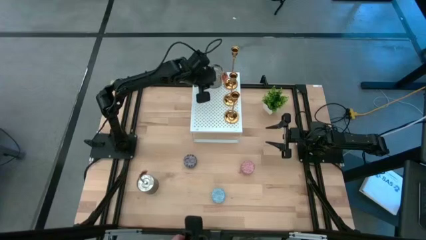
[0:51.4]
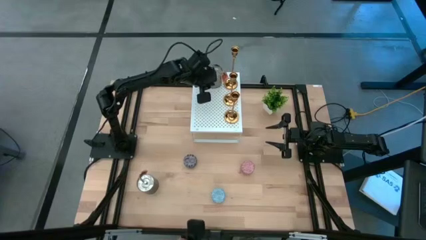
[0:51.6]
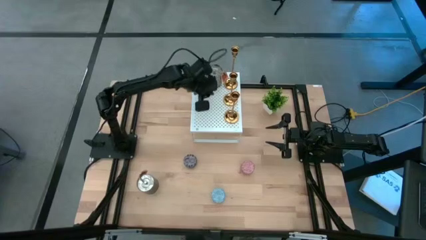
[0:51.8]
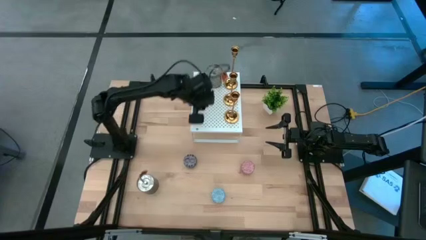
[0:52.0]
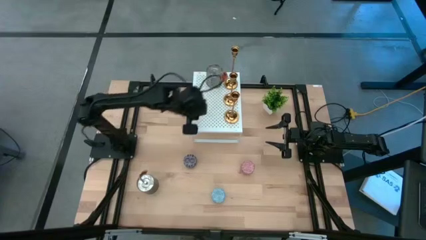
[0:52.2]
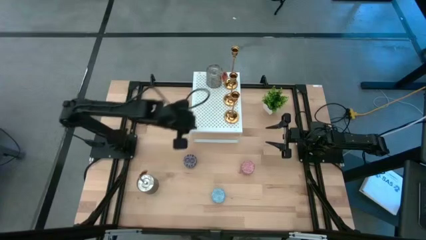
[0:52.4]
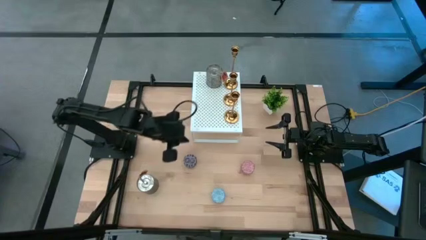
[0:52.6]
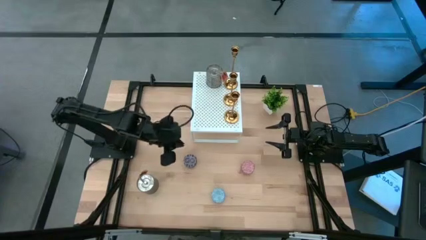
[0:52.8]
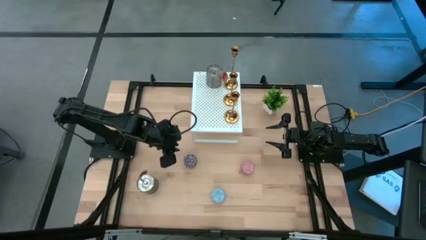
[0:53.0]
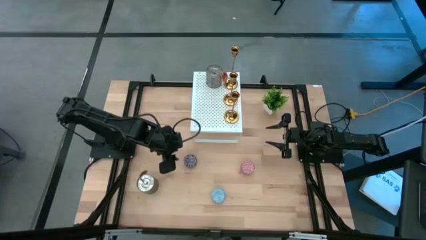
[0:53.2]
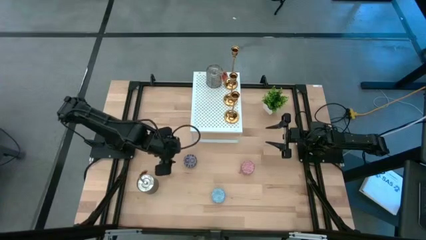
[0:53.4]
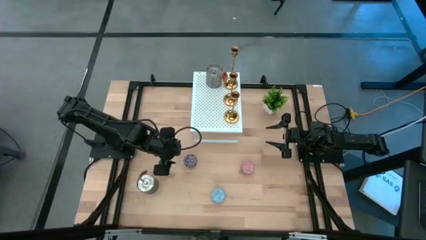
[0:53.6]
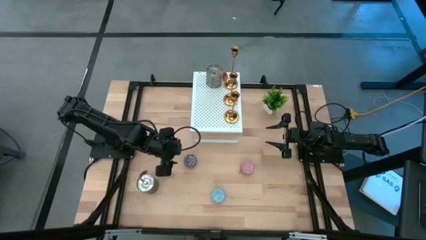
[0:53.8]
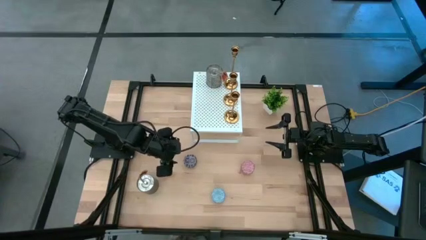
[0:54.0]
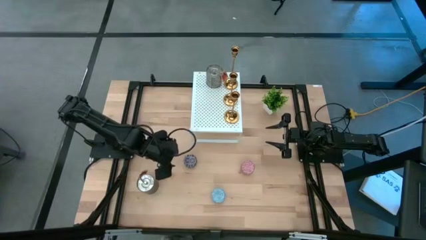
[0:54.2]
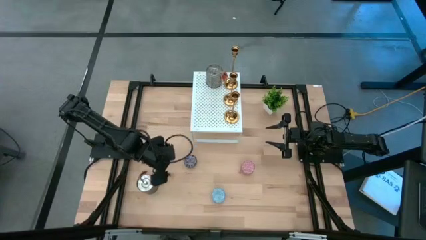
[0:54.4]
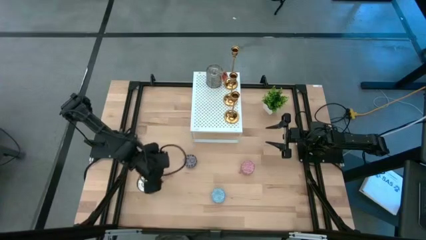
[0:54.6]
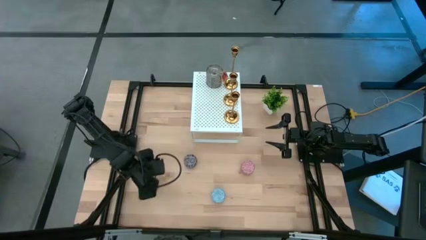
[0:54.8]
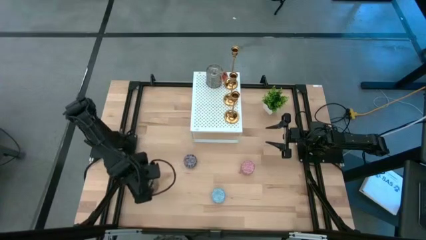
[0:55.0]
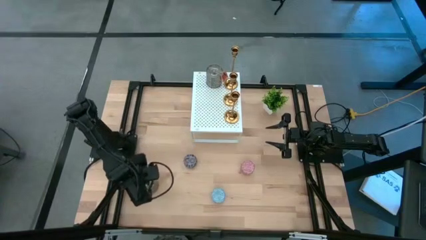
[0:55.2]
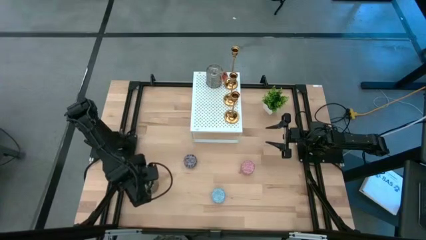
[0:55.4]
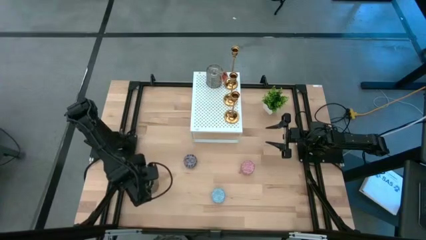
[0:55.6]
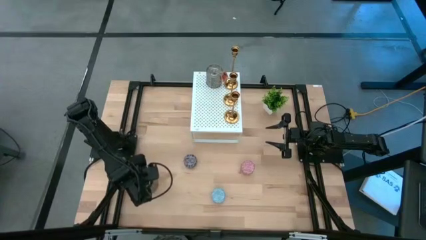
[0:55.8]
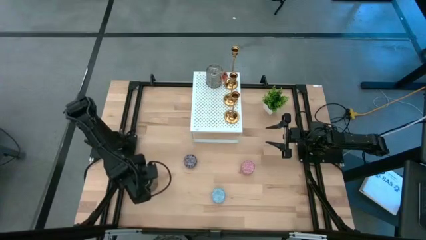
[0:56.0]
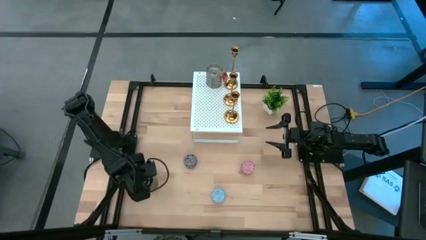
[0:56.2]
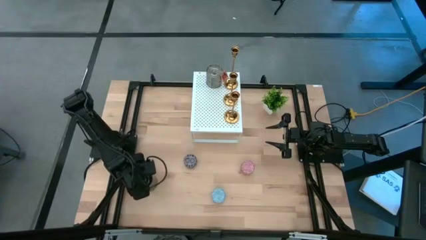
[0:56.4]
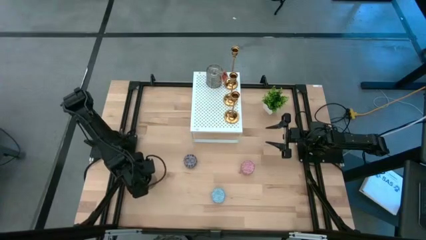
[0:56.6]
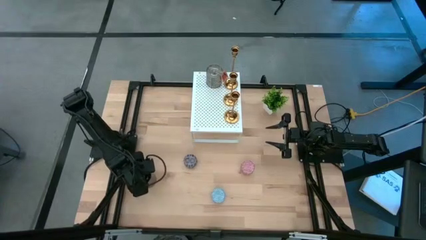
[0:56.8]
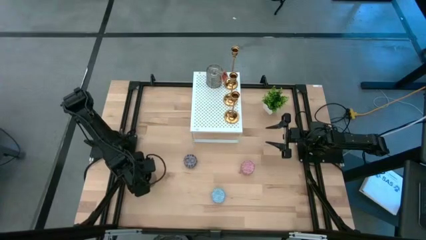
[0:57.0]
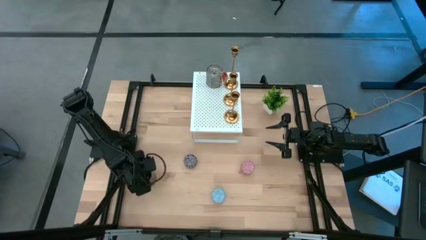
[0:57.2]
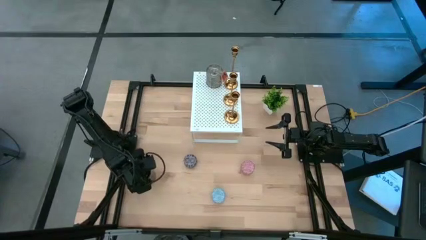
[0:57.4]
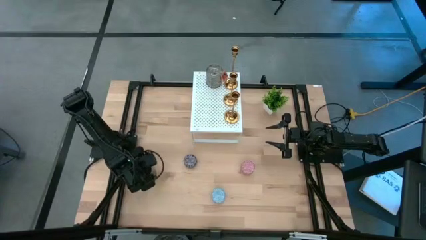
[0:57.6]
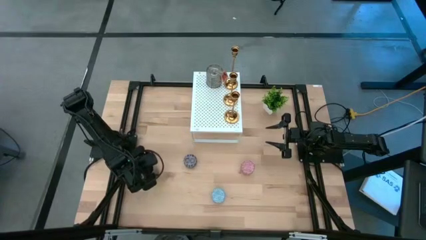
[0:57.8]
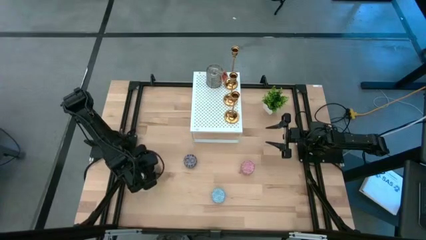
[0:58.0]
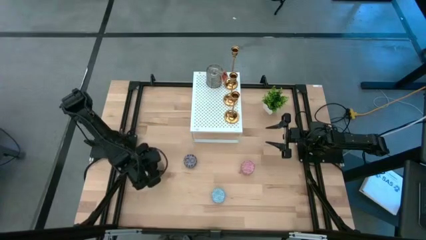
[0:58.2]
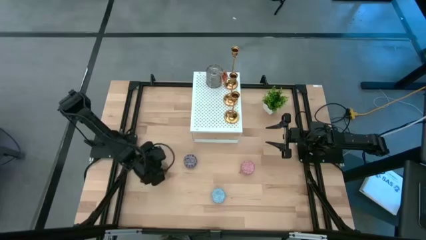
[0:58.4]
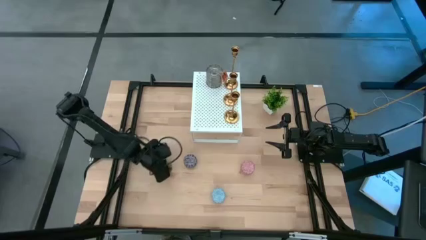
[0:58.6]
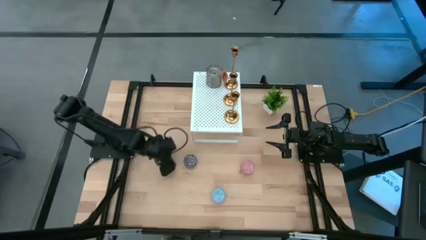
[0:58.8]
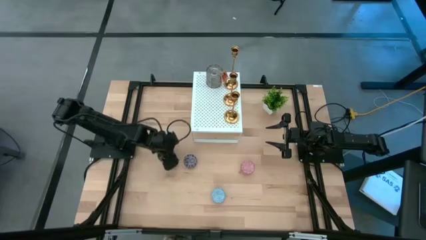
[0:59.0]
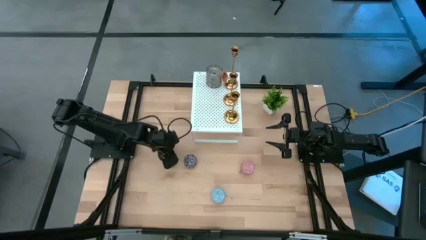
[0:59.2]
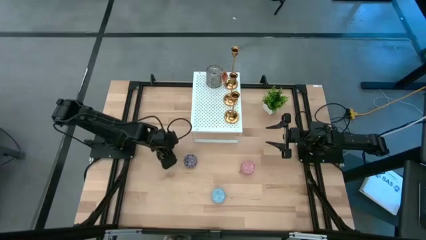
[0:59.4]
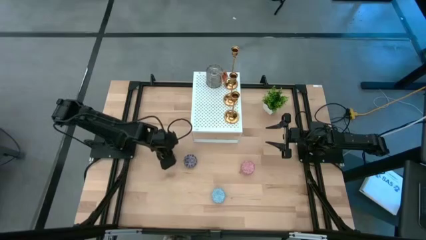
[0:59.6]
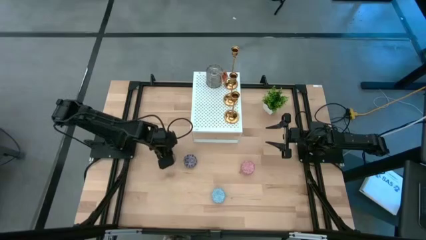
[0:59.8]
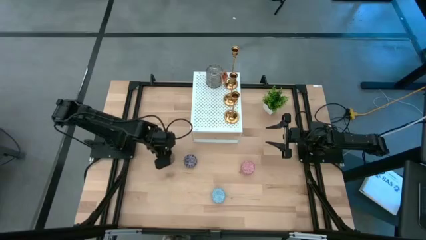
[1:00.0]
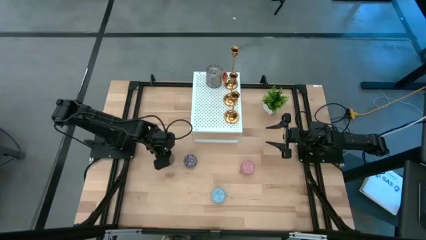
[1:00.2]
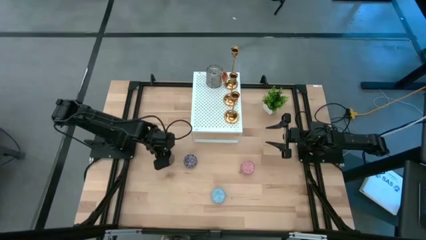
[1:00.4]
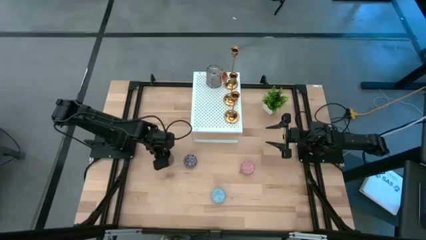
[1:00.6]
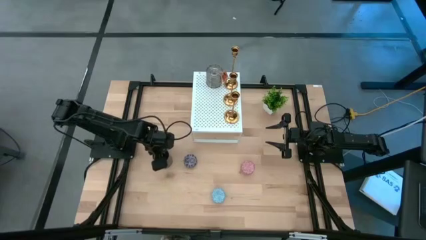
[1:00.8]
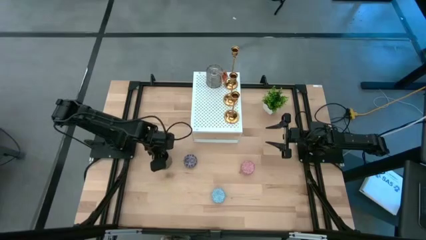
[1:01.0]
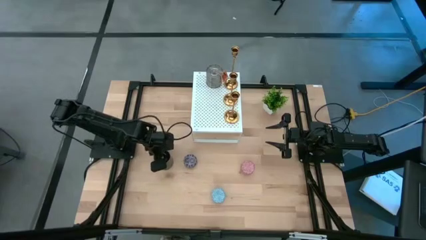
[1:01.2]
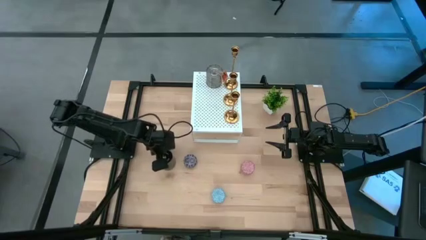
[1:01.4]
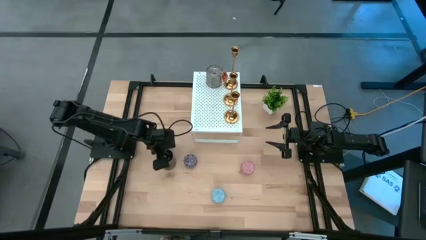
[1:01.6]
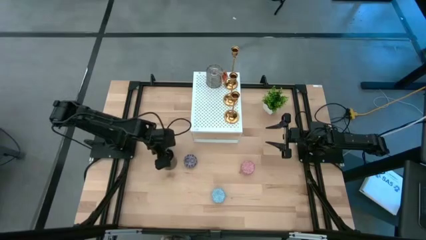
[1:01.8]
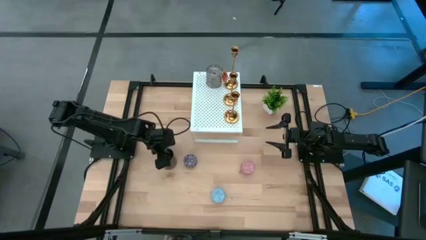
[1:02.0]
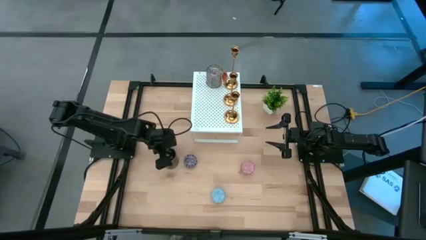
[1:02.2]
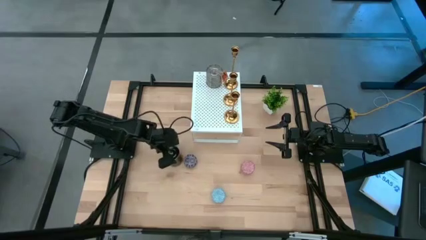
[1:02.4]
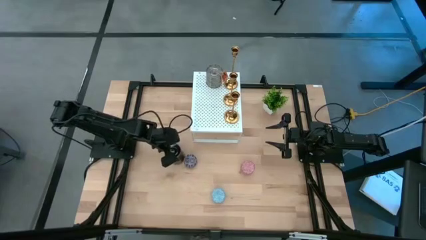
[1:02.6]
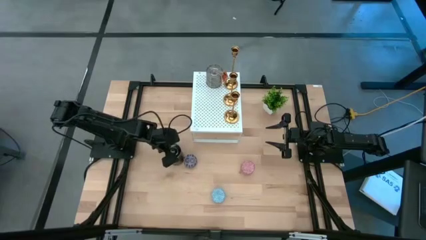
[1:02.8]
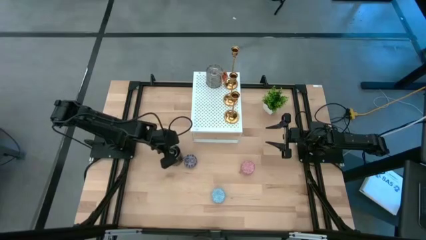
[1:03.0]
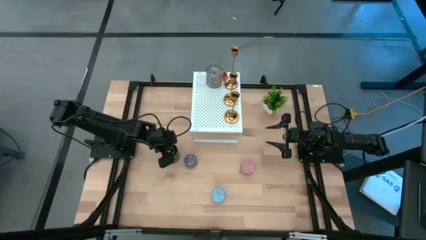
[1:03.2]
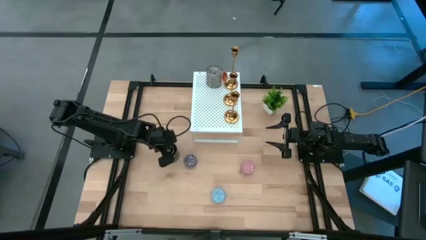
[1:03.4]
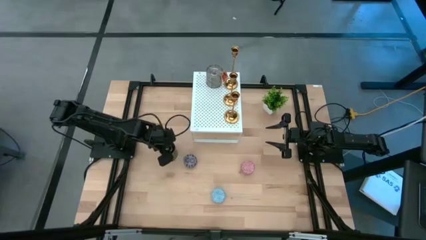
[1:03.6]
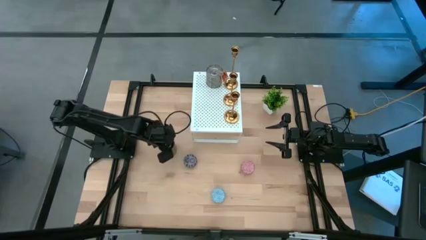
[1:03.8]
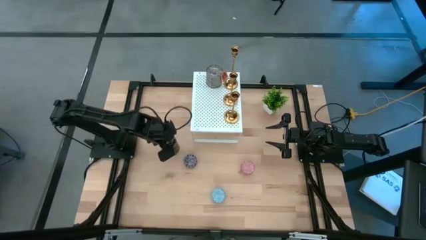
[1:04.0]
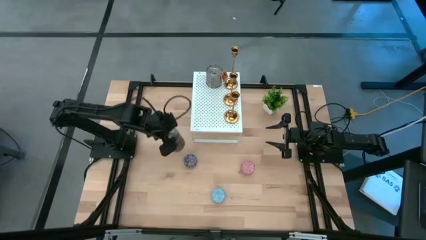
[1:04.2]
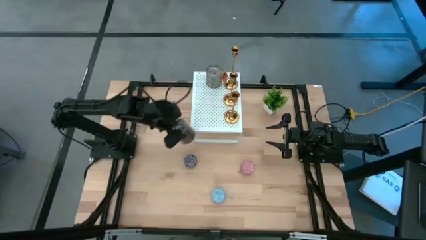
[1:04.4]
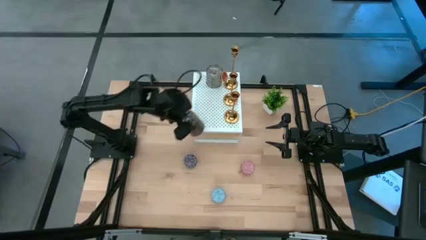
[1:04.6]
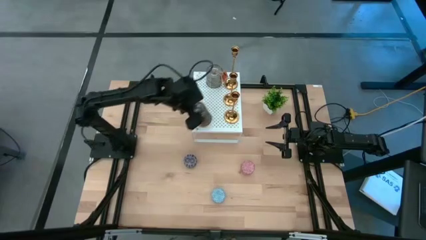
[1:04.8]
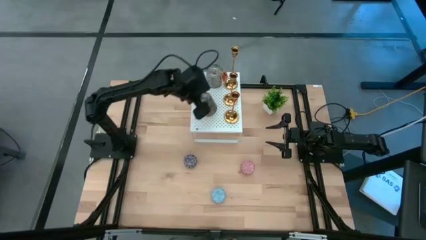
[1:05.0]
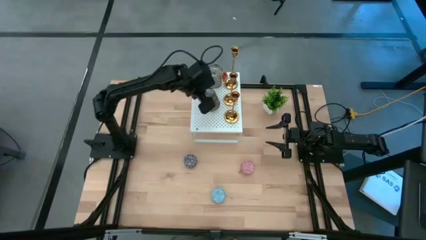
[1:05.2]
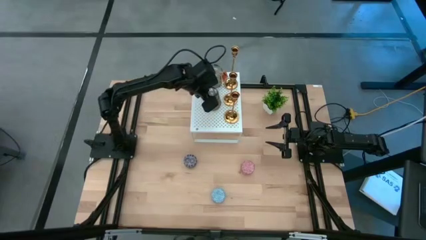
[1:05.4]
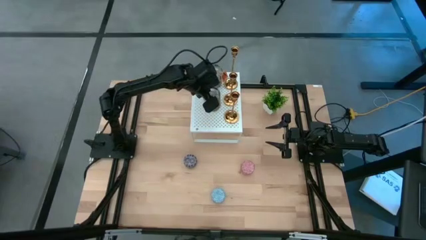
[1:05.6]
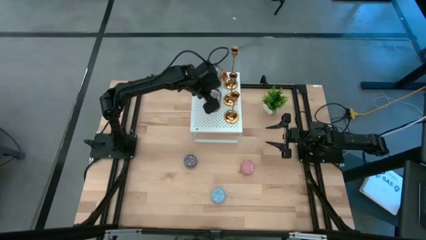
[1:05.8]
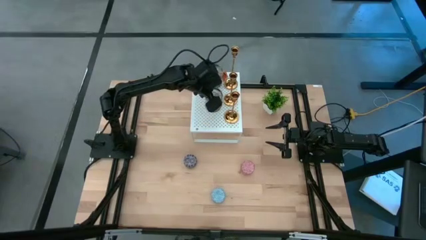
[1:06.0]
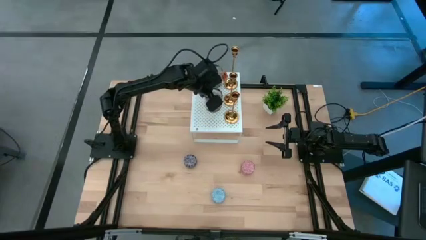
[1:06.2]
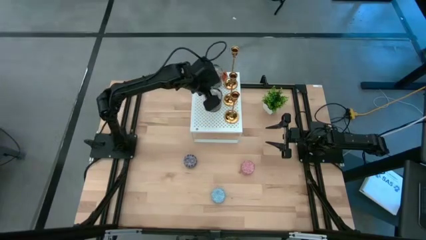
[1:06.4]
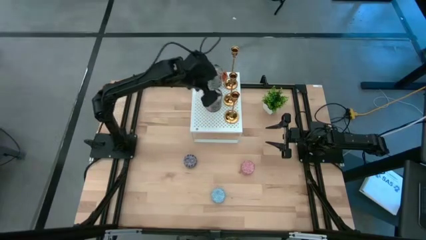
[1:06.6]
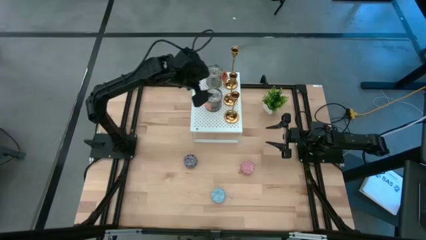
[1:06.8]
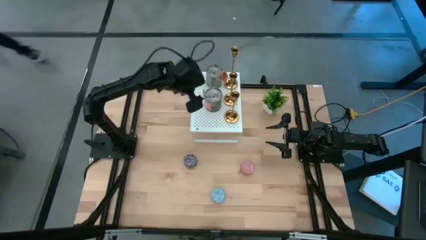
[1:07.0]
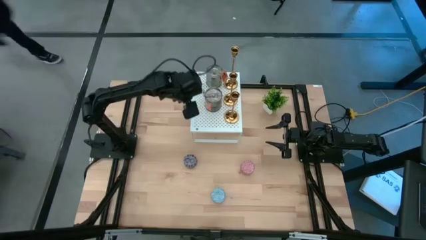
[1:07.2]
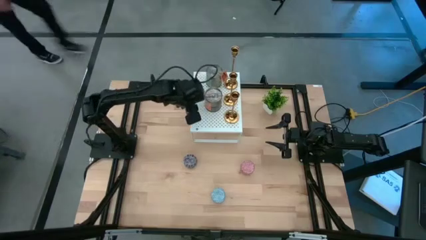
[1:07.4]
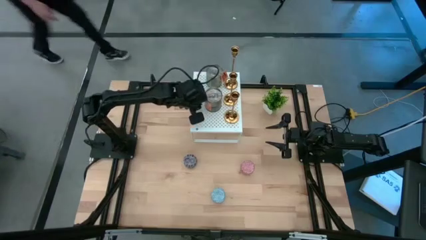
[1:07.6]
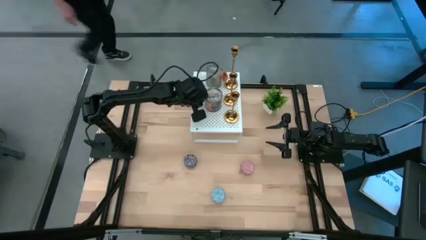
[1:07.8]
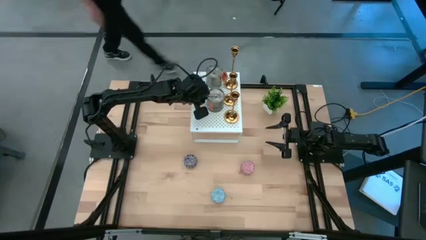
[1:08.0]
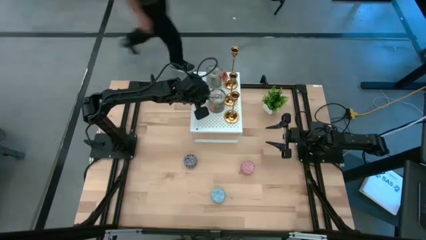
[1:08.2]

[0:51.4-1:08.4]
Task: Pick & Place candle stick holders
Put the silver scented candle can on the shelf
